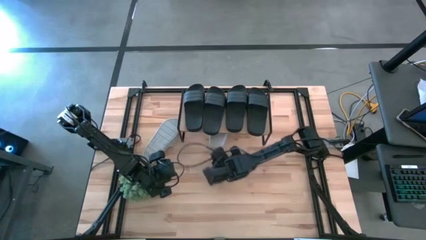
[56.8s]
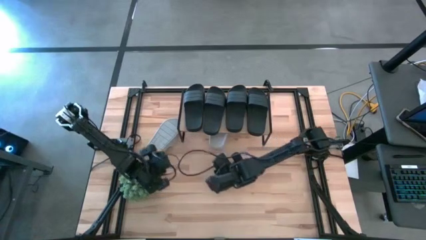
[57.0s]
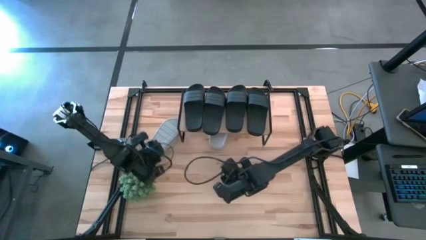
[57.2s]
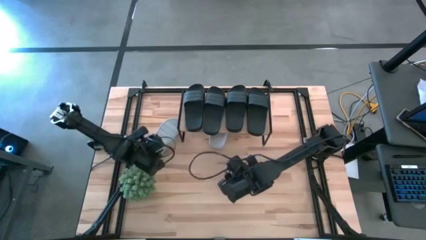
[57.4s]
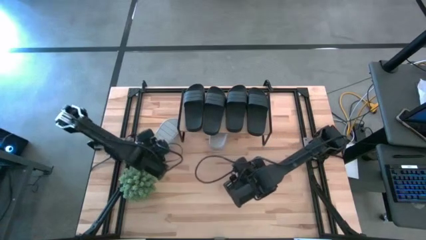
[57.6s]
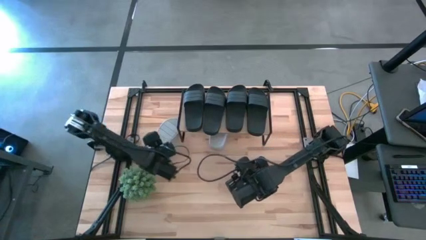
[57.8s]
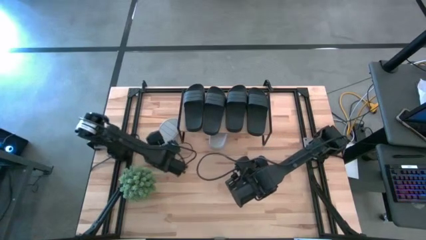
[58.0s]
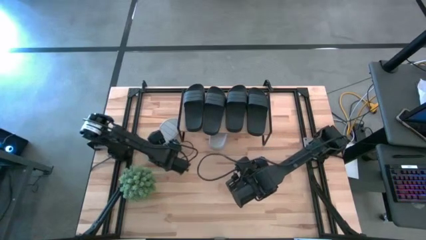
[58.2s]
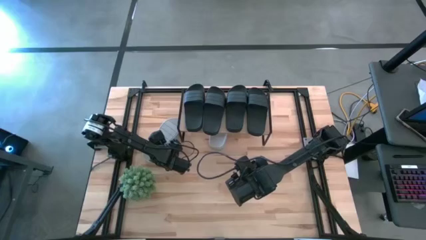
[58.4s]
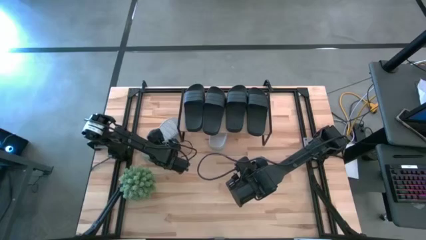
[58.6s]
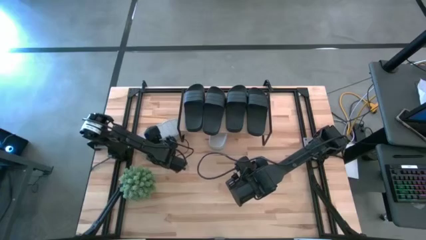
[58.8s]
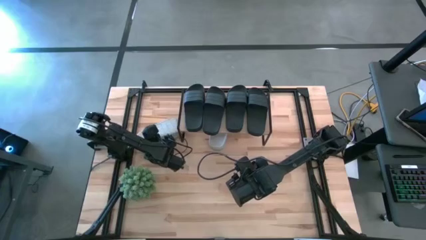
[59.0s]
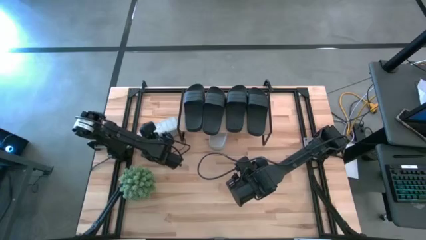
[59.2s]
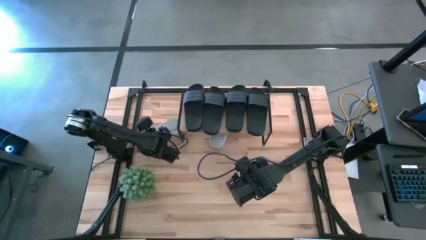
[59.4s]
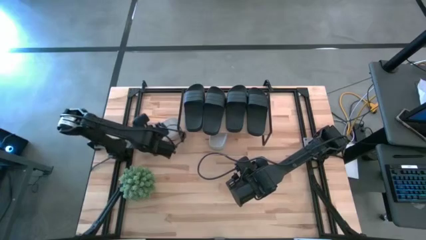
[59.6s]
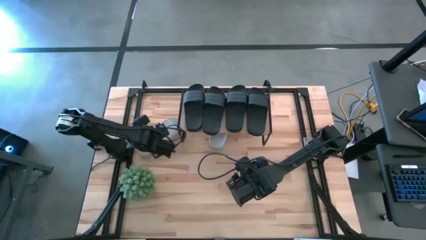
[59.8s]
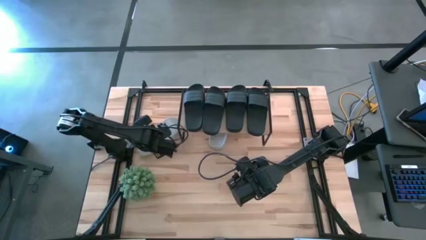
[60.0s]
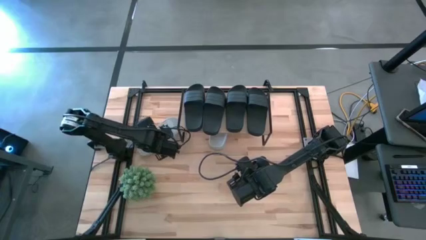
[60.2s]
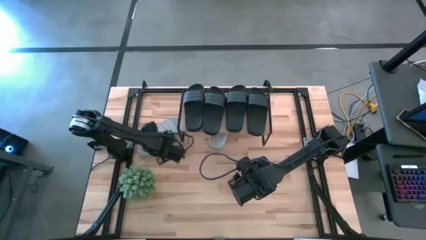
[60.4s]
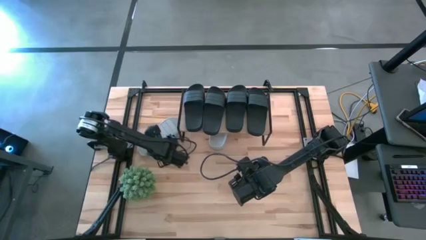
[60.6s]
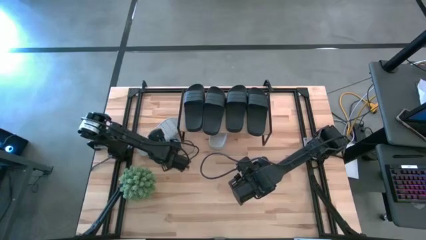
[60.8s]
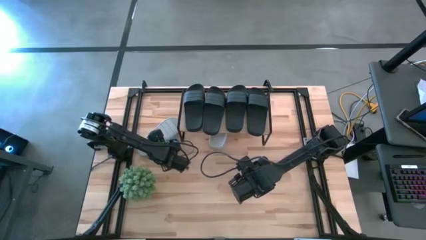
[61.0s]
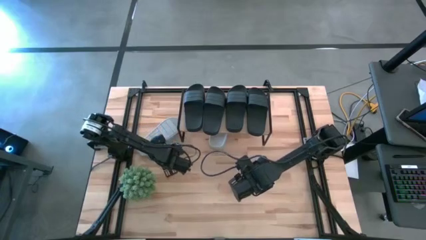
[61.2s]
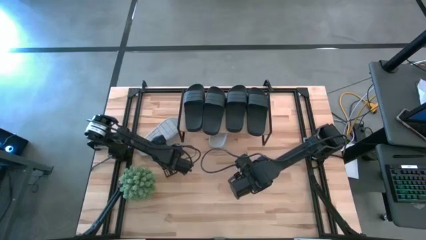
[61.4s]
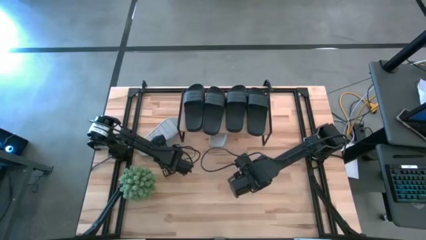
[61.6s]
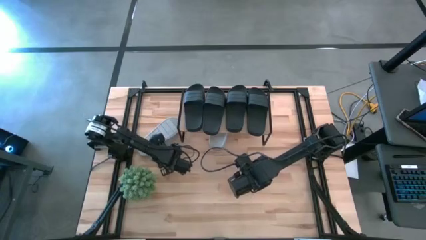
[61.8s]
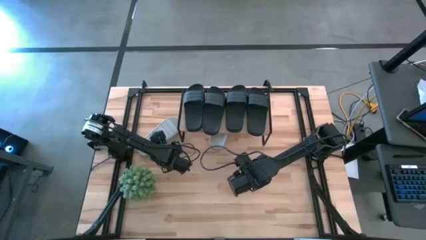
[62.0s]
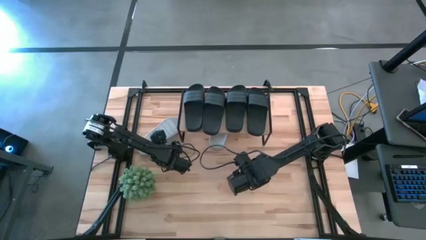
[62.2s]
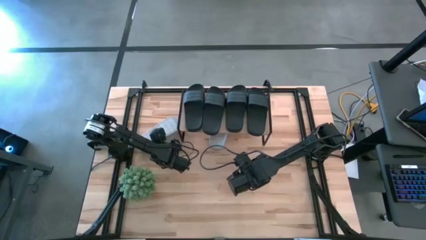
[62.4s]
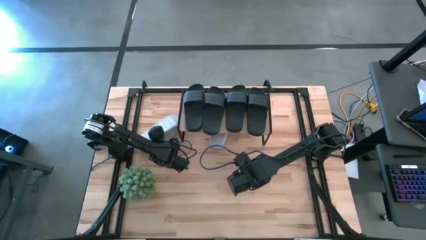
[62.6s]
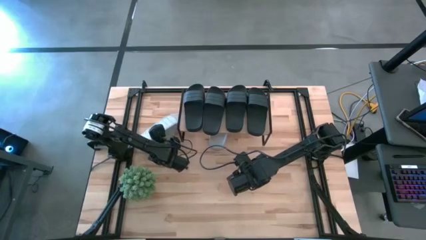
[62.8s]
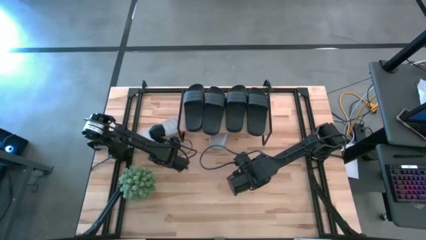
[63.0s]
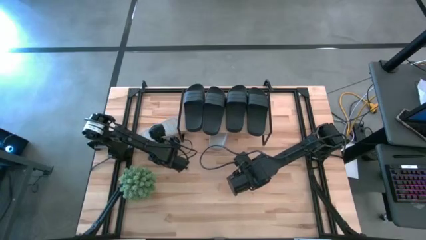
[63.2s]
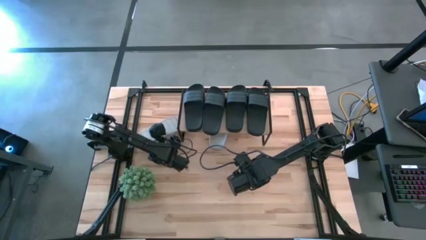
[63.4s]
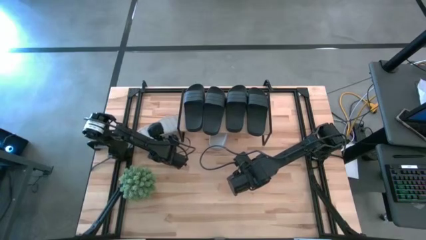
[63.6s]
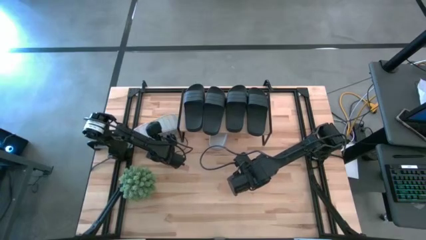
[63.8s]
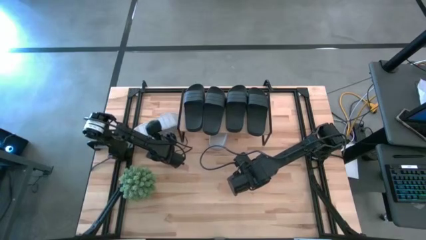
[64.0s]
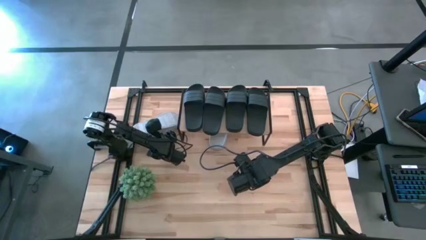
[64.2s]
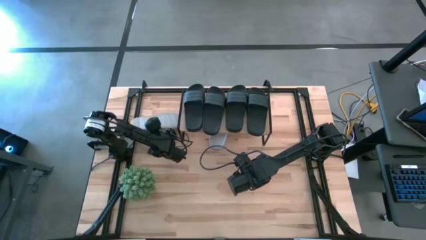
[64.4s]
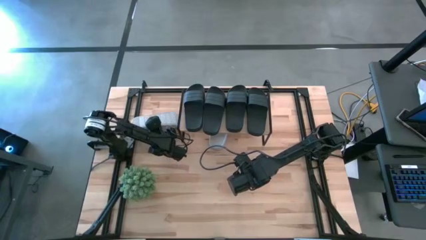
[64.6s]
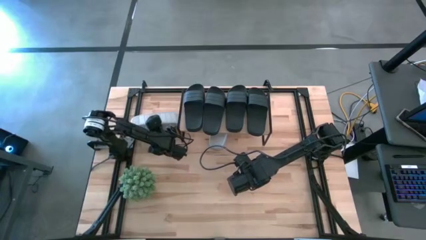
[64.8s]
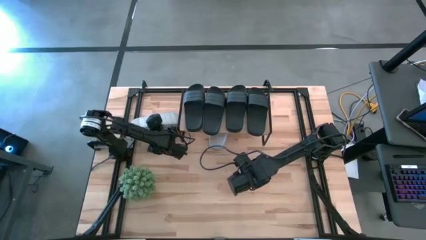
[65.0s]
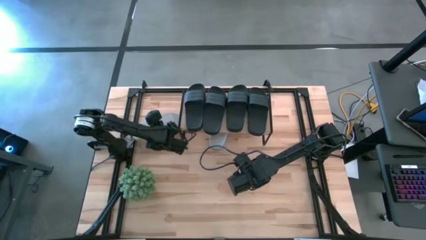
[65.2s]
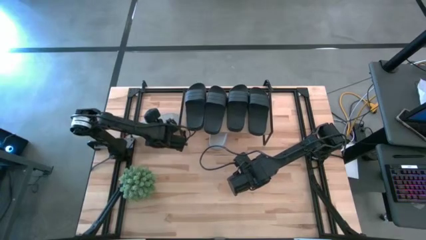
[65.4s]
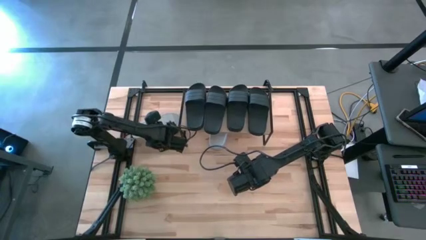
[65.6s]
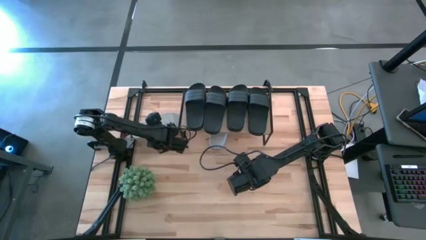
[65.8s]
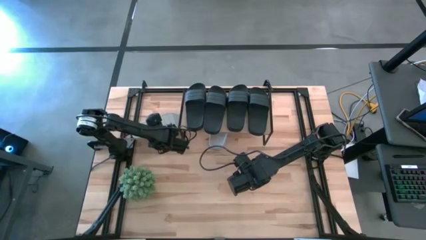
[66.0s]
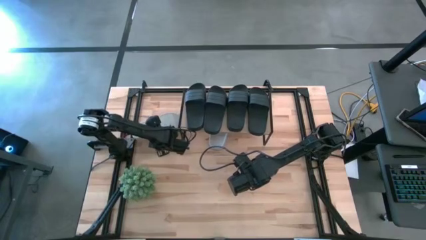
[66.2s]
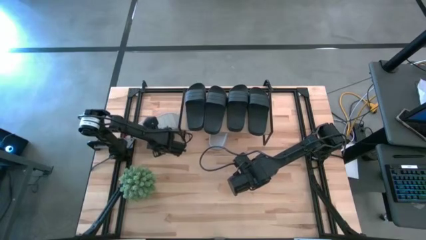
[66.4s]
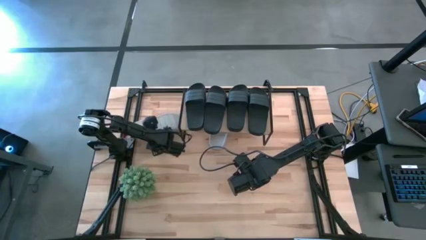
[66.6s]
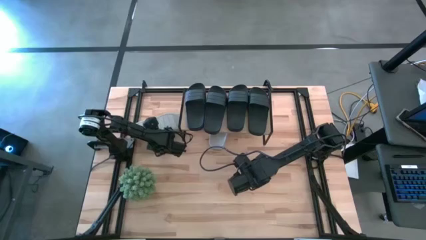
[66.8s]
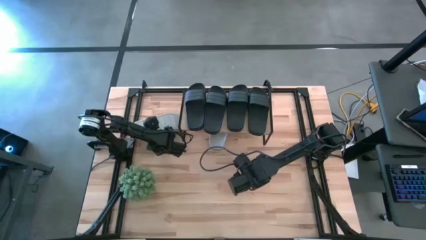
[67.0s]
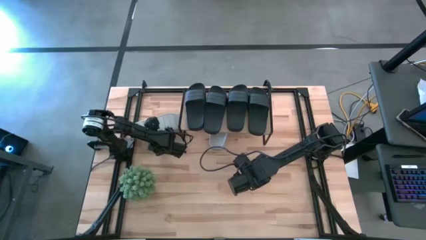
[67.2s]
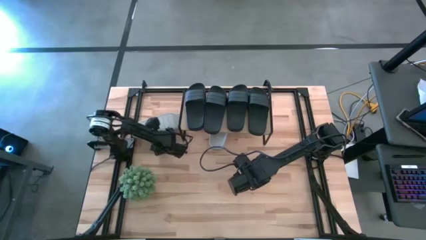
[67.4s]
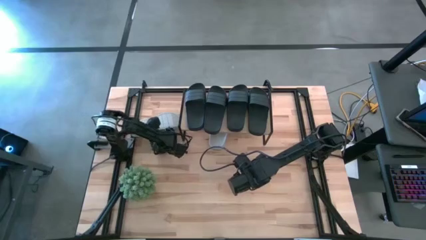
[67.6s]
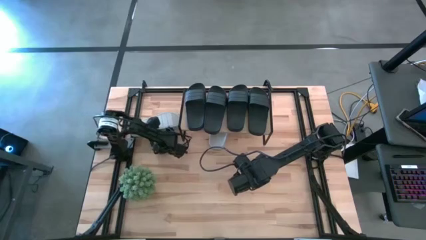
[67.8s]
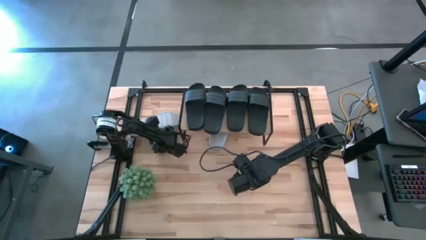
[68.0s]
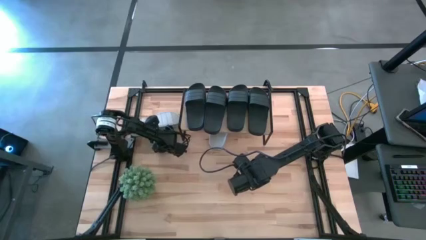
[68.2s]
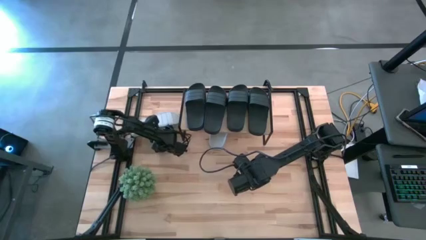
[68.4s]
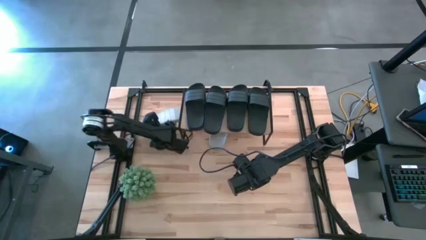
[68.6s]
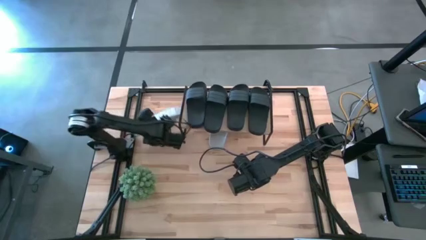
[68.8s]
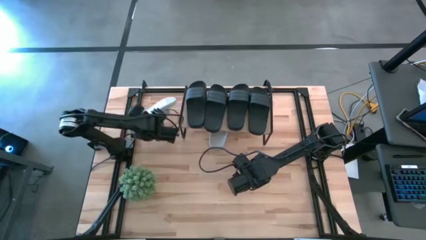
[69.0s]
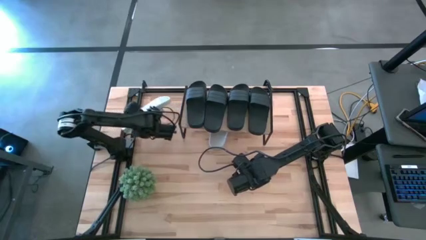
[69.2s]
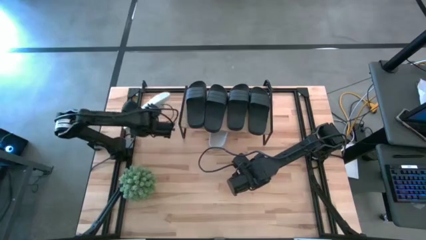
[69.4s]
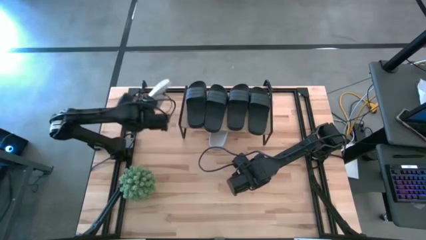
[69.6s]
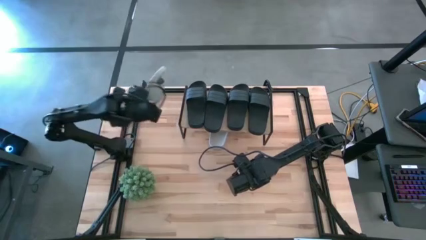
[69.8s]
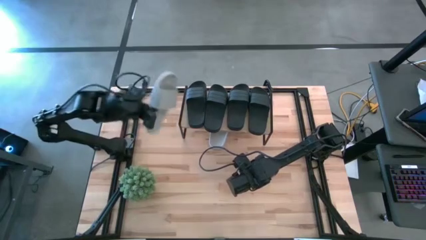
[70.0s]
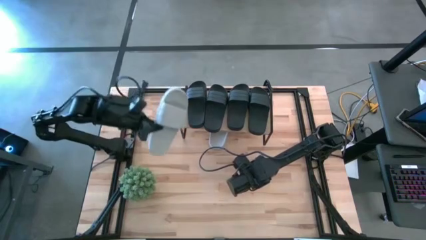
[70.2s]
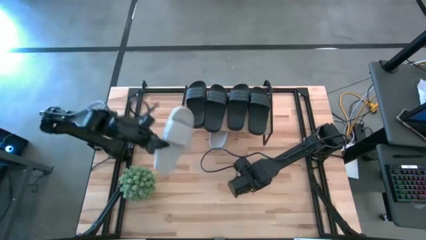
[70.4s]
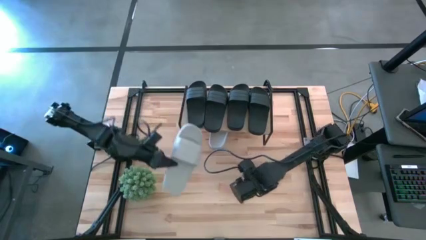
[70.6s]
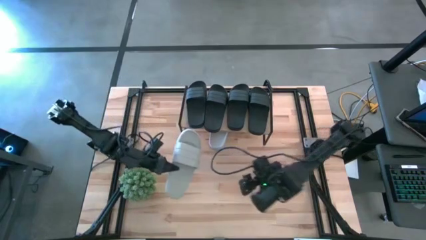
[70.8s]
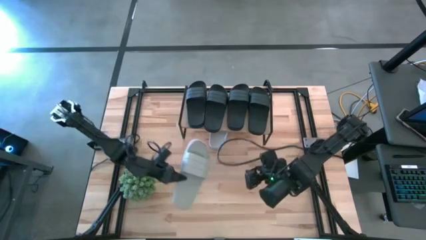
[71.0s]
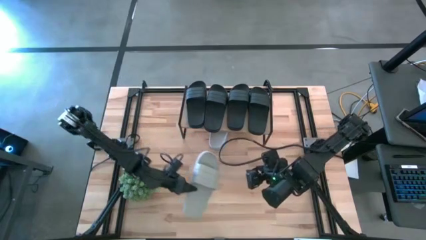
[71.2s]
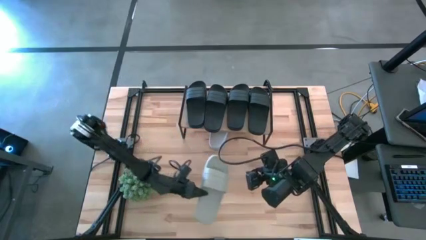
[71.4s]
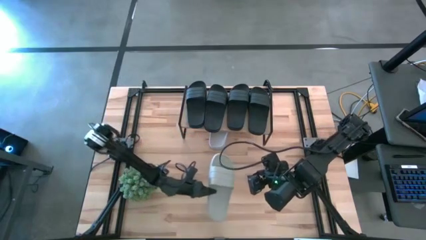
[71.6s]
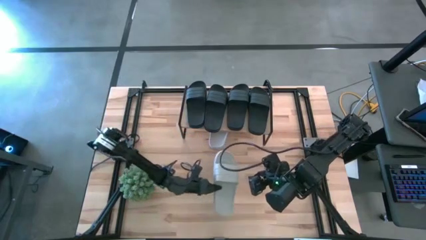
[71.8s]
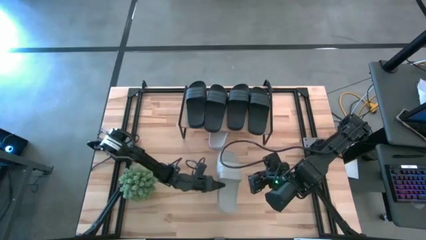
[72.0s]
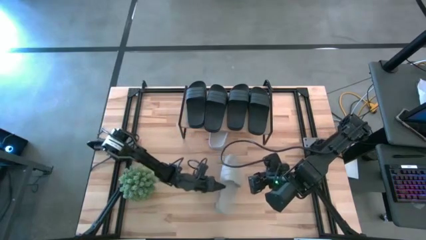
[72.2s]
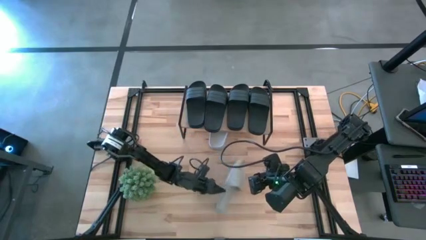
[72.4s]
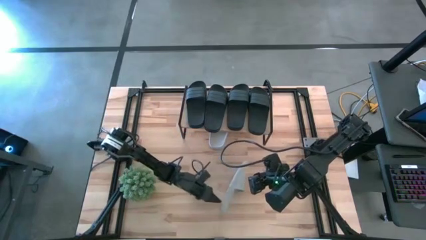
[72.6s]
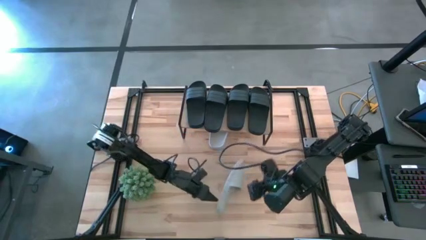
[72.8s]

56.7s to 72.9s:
Task: Pick and place slides into the shelf
Put the gray slipper under the shelf
